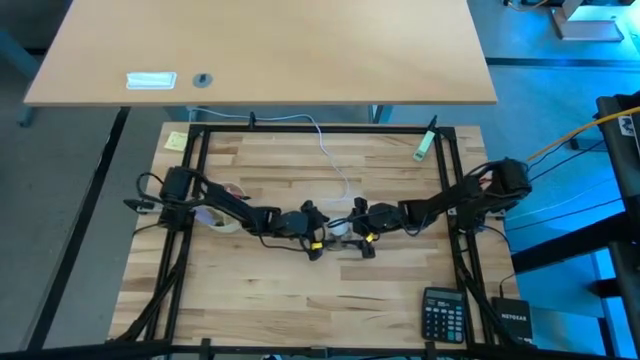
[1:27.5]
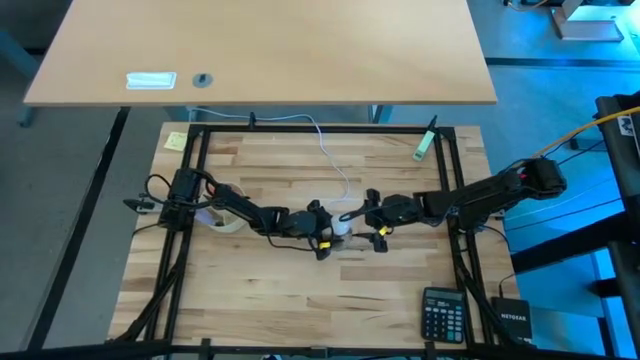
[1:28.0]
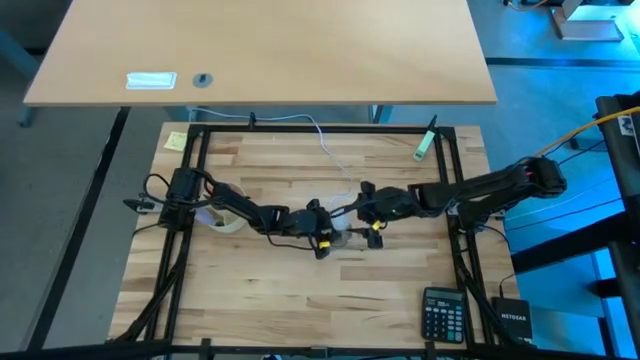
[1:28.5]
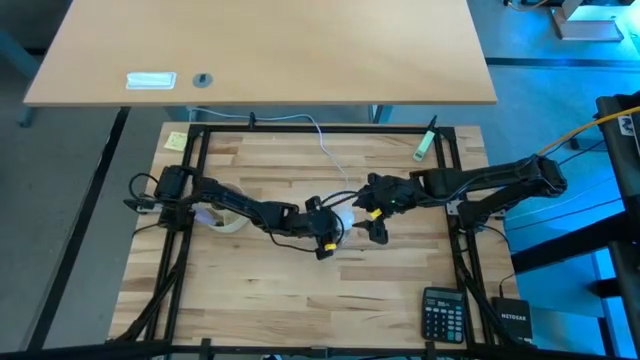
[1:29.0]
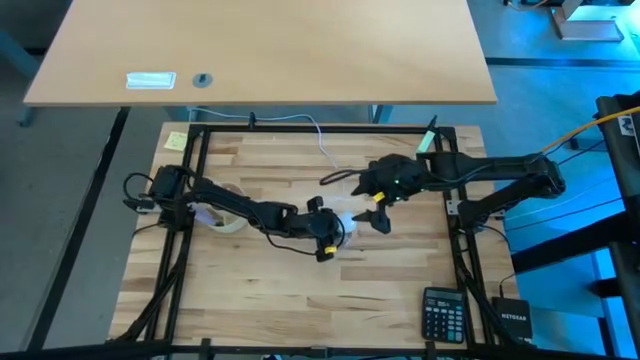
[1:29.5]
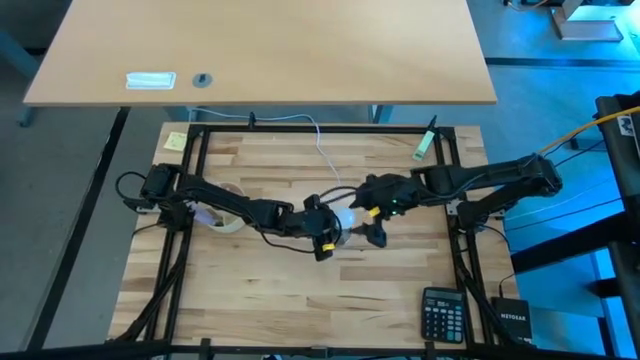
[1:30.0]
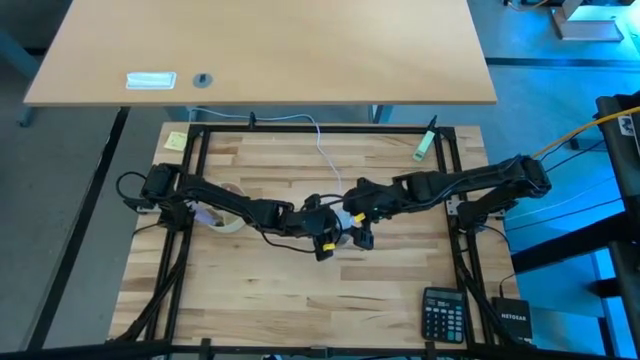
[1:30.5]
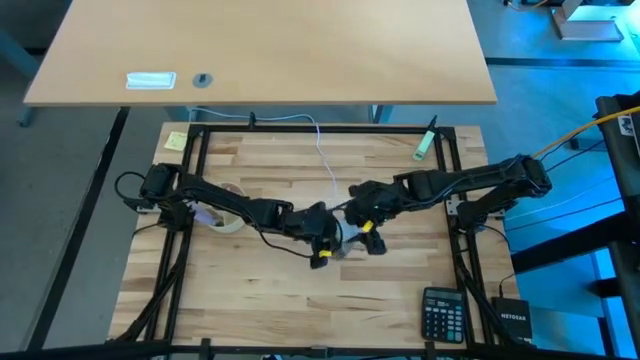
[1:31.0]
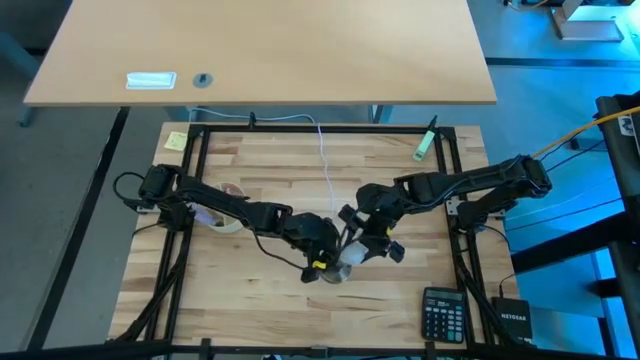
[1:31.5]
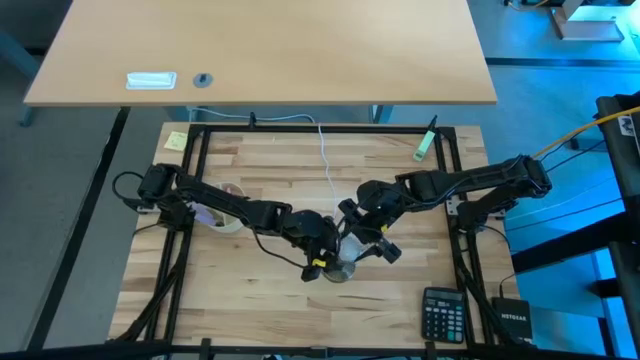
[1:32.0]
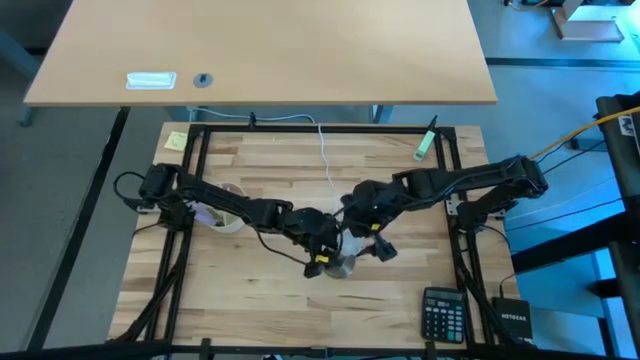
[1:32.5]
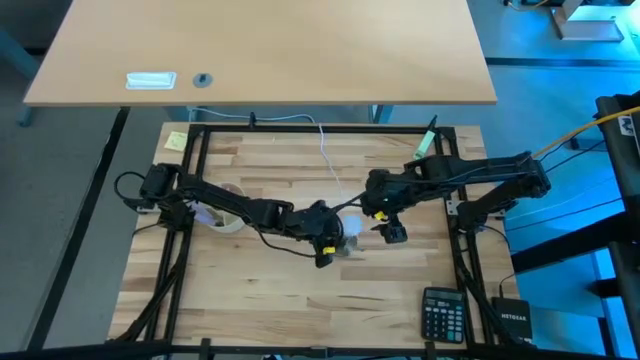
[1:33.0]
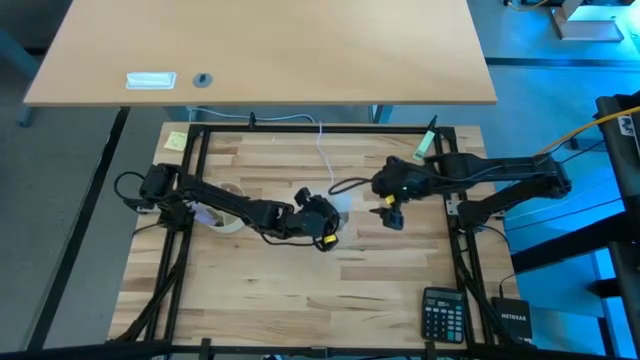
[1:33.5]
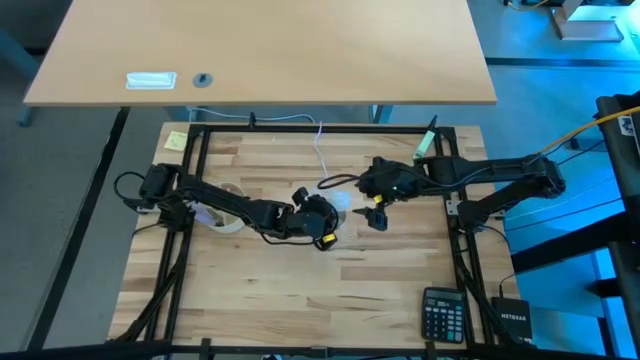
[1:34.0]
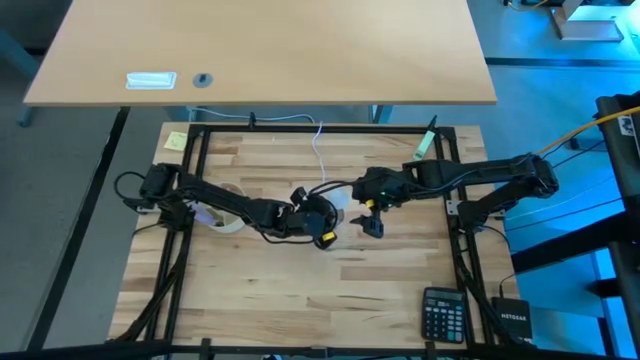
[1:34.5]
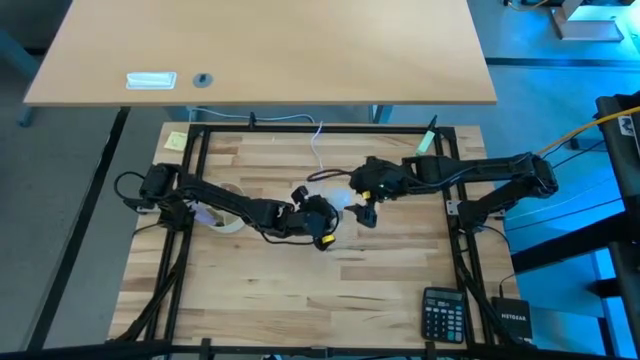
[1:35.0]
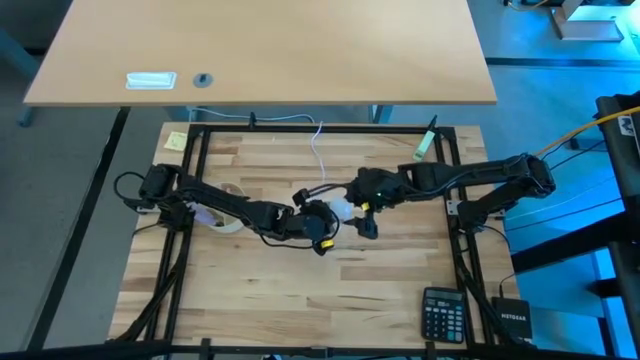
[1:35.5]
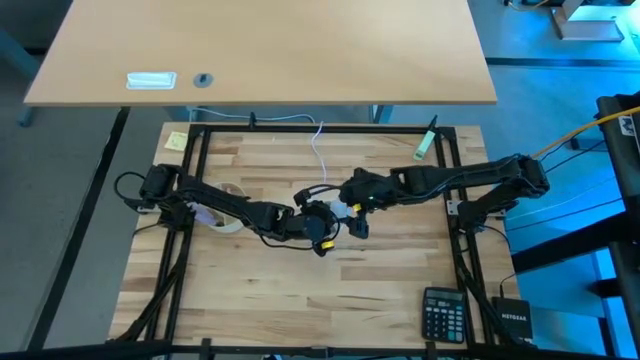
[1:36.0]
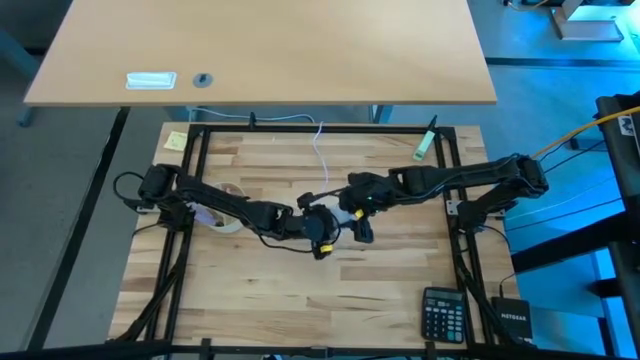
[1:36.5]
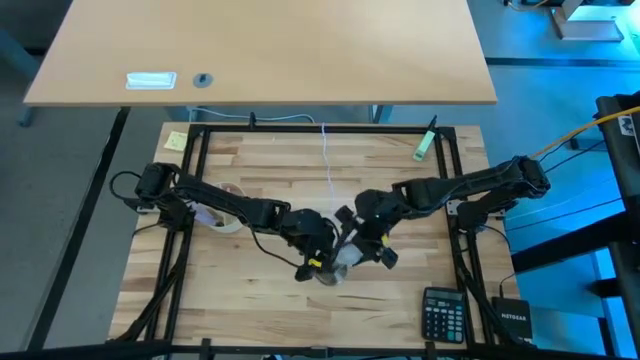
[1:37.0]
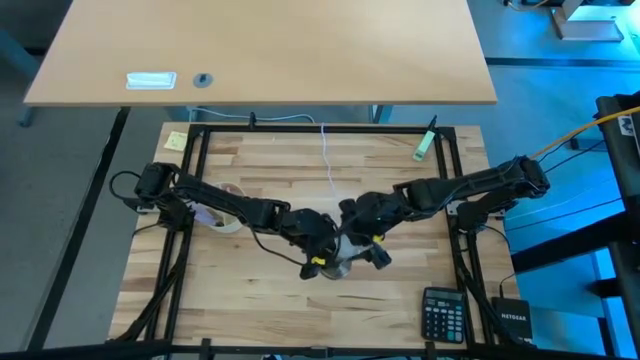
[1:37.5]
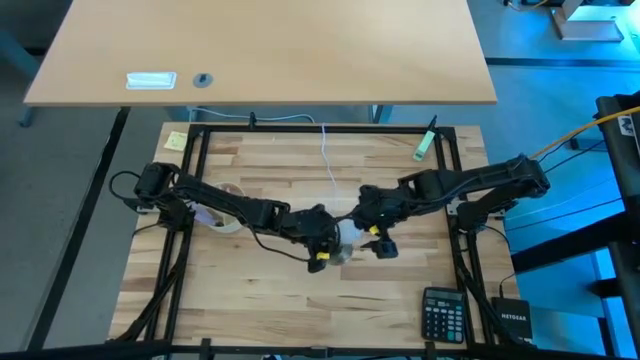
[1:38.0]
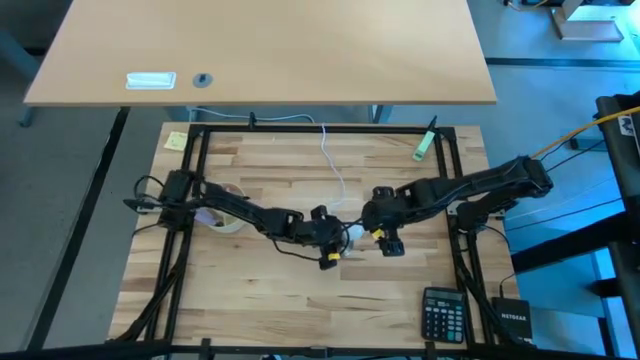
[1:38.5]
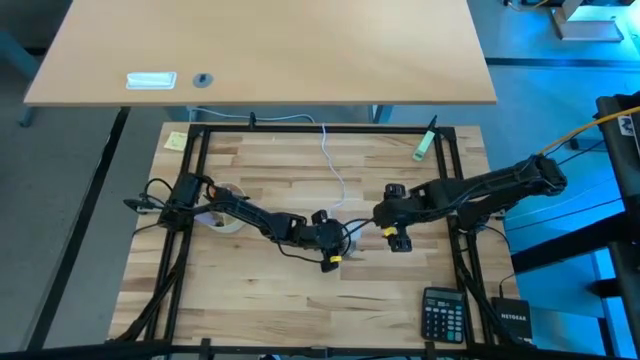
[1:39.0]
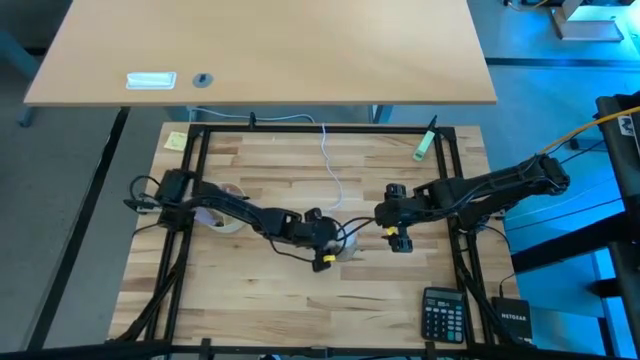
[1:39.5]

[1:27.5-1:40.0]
Task: Screw lightbulb
Remove the lightbulb from the lamp

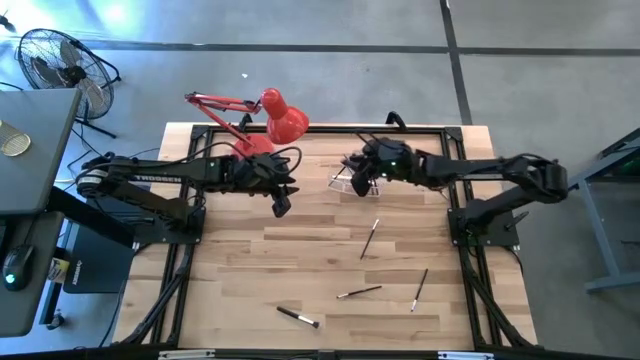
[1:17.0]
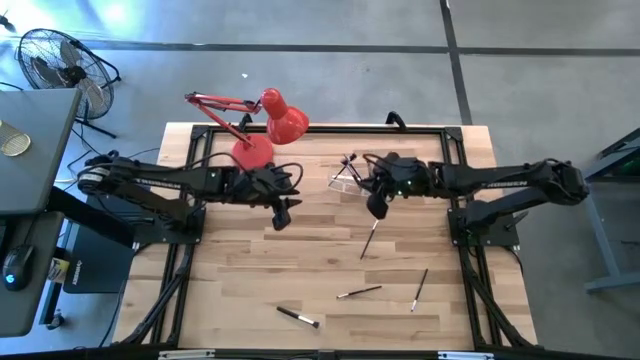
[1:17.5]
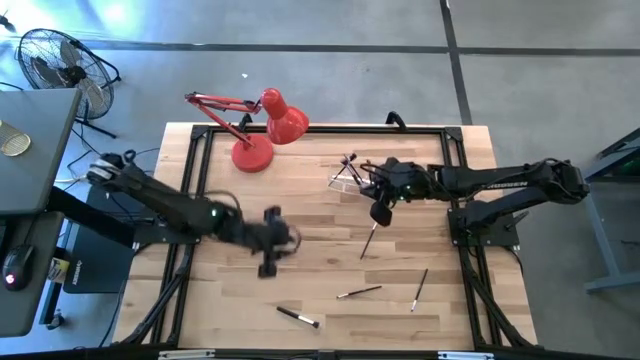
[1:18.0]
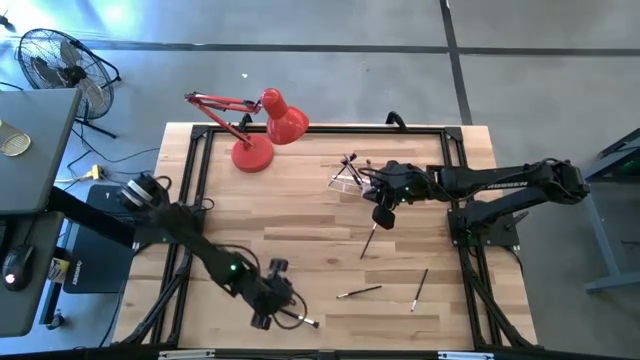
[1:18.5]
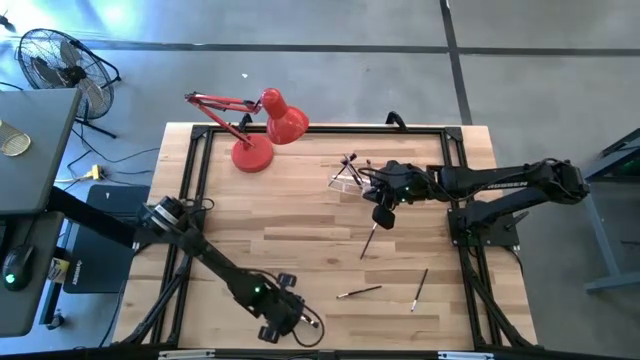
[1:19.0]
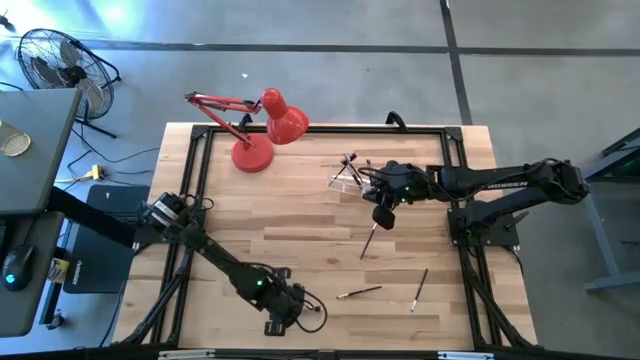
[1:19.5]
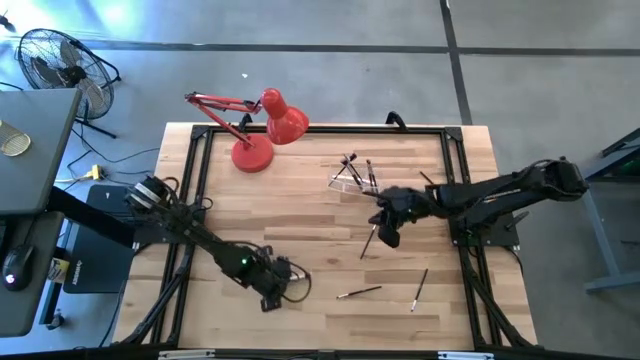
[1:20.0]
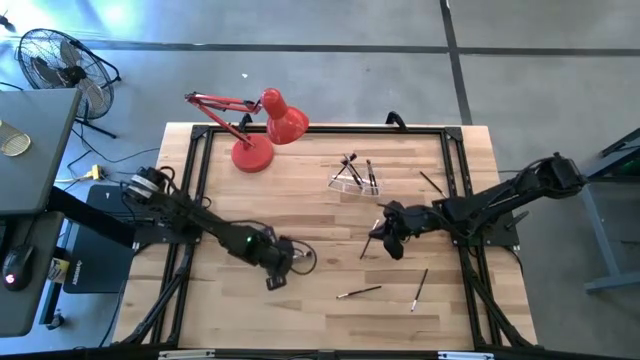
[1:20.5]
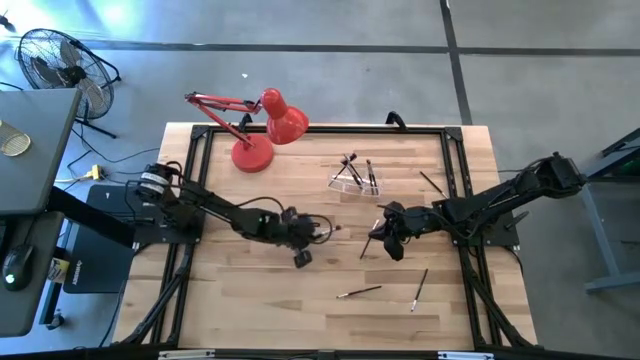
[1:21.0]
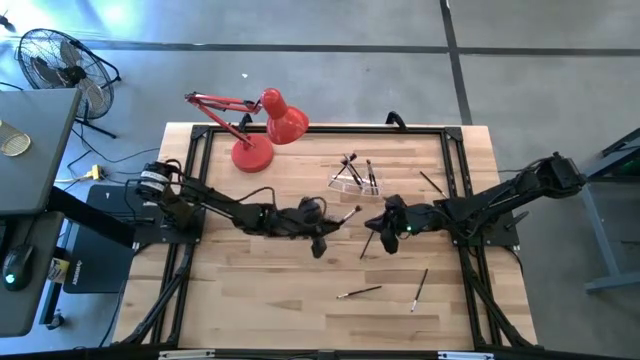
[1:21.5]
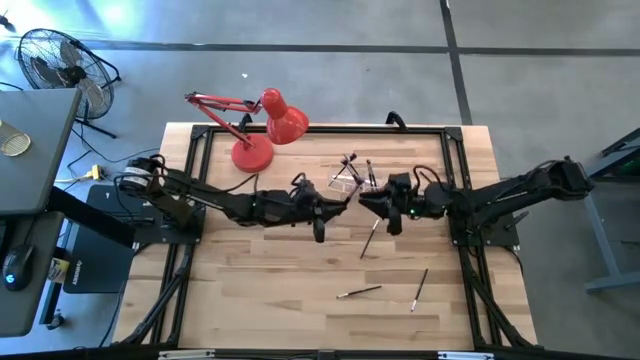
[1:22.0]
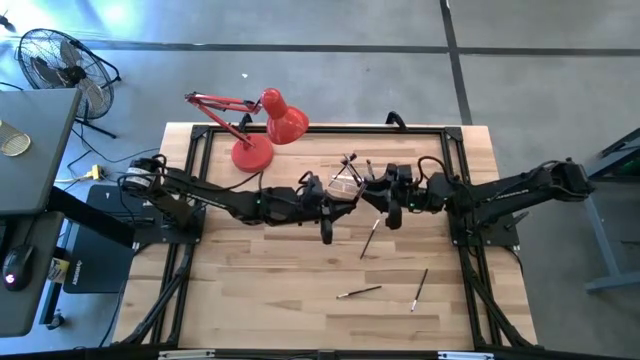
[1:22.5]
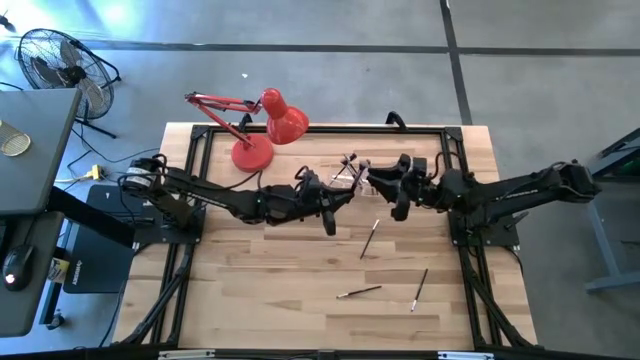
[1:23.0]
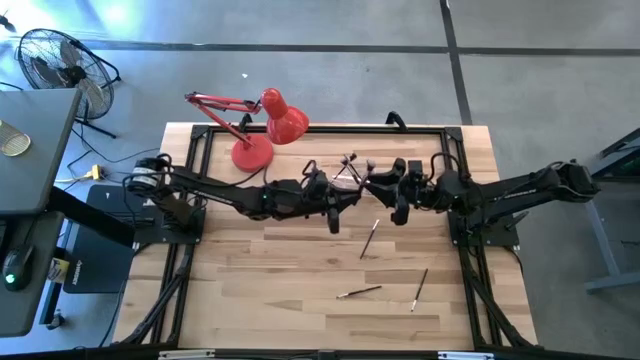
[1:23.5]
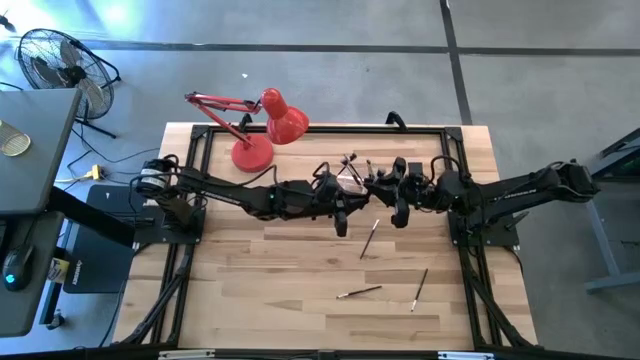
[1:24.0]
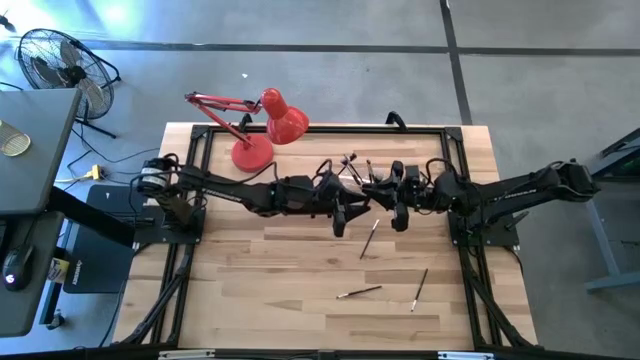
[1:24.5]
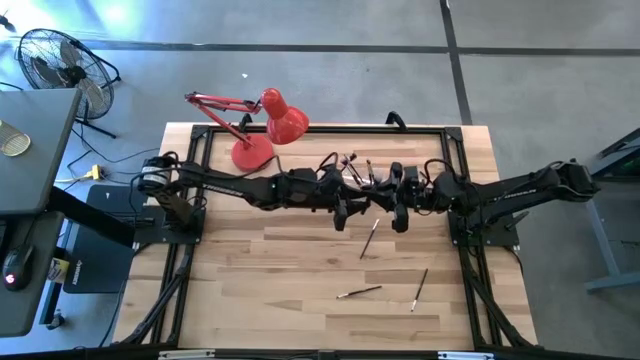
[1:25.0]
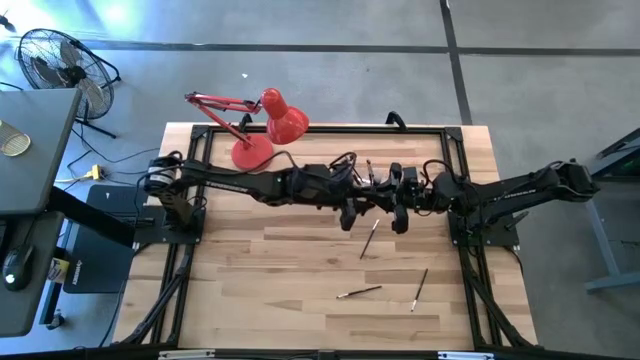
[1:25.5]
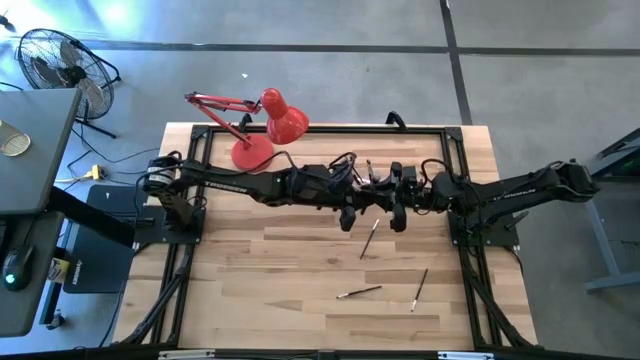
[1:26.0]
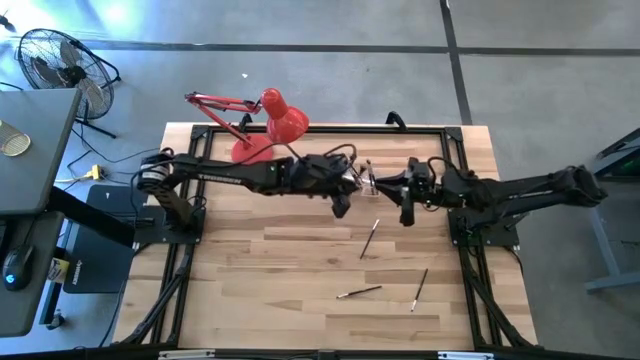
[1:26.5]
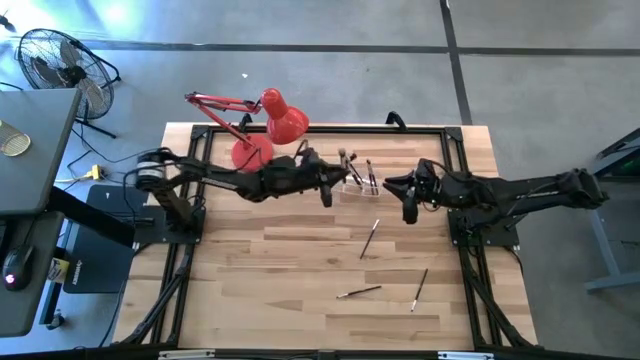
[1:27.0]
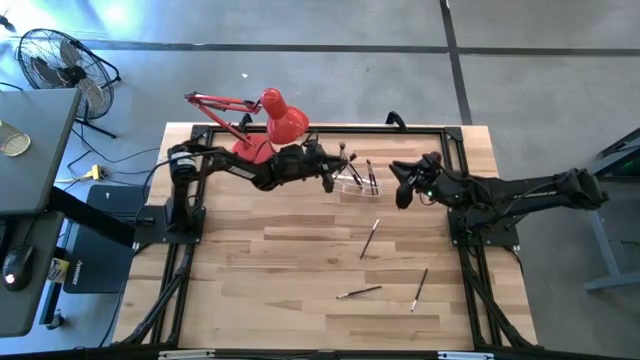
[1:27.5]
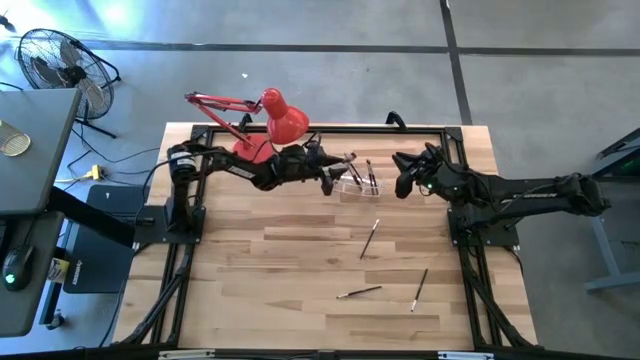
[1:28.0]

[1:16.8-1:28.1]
Task: Put items in baskets/containers
Put the powder brush into the transparent organizer
